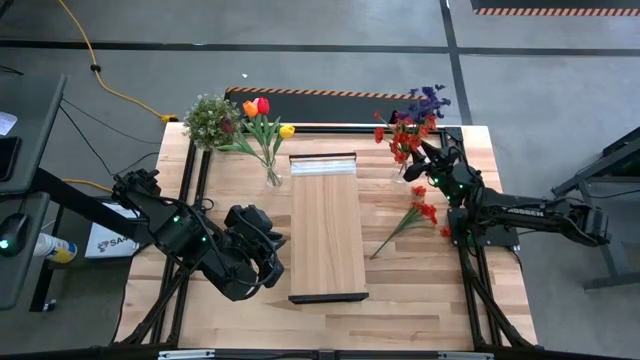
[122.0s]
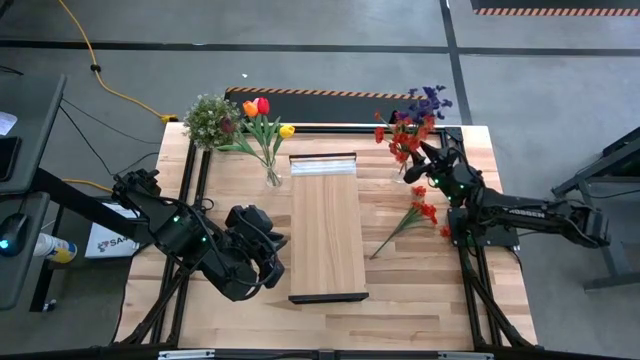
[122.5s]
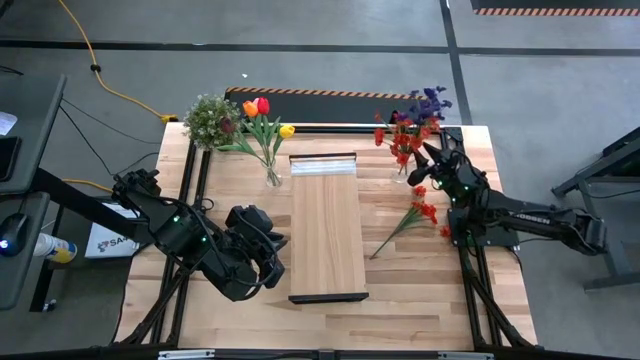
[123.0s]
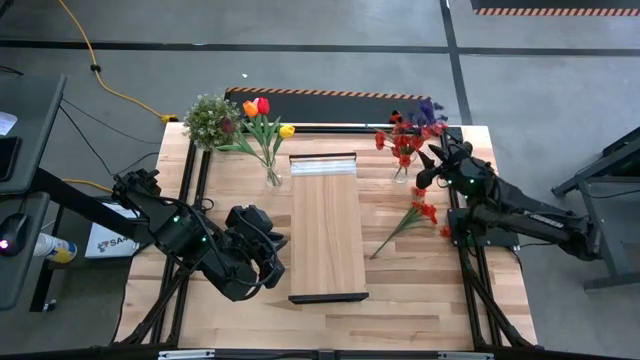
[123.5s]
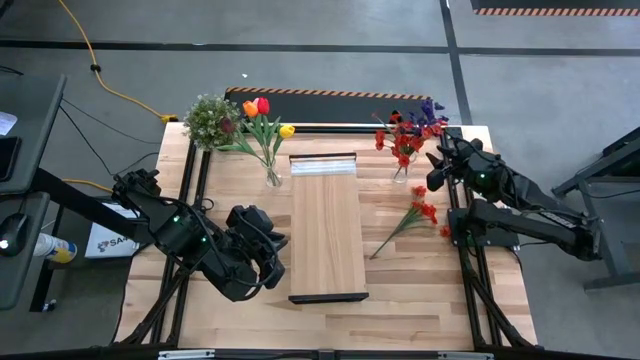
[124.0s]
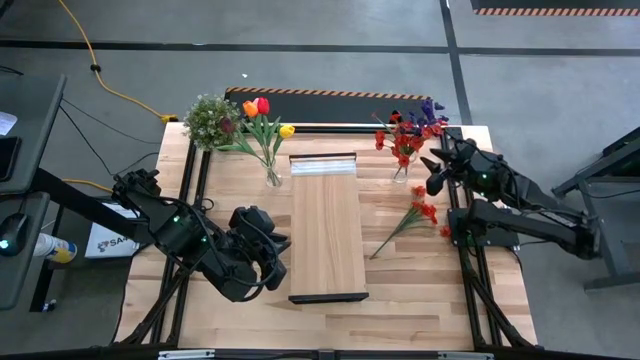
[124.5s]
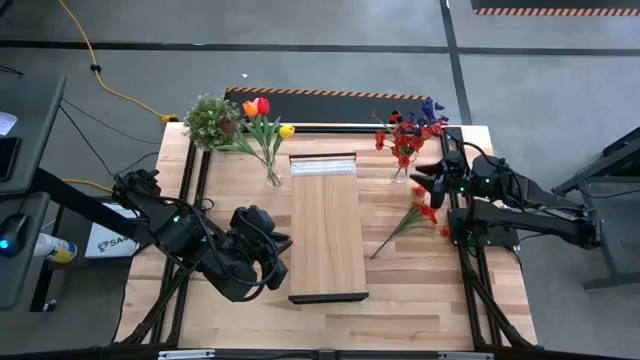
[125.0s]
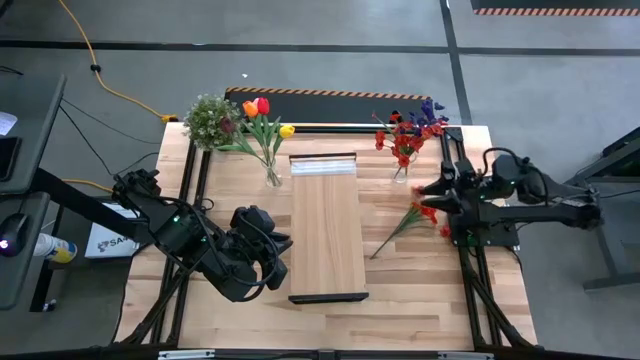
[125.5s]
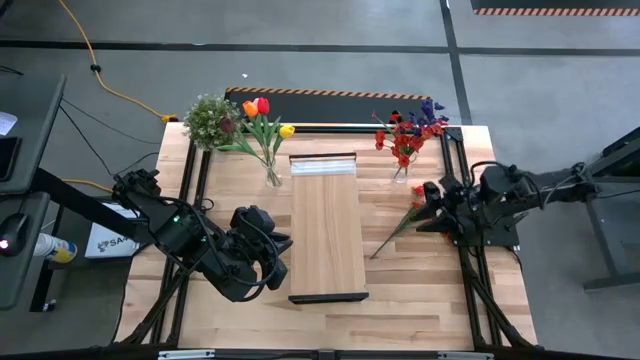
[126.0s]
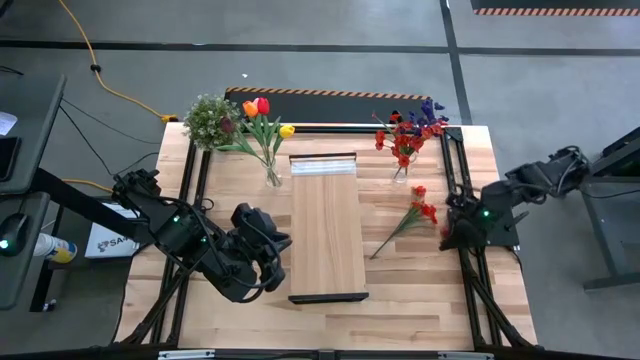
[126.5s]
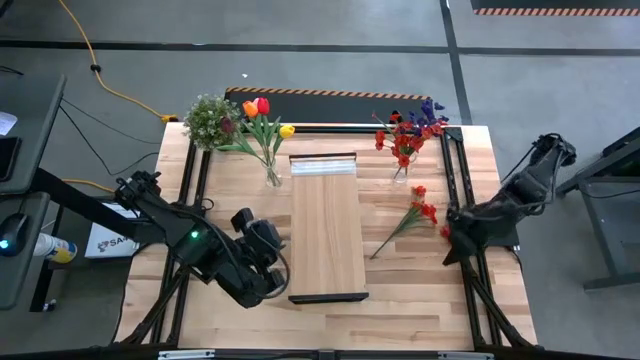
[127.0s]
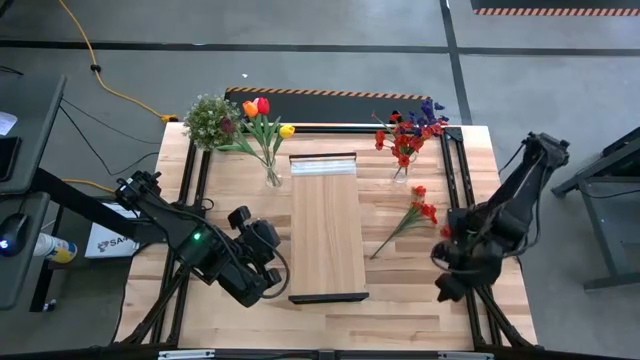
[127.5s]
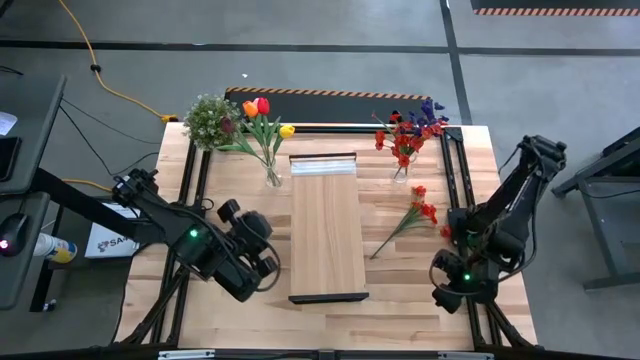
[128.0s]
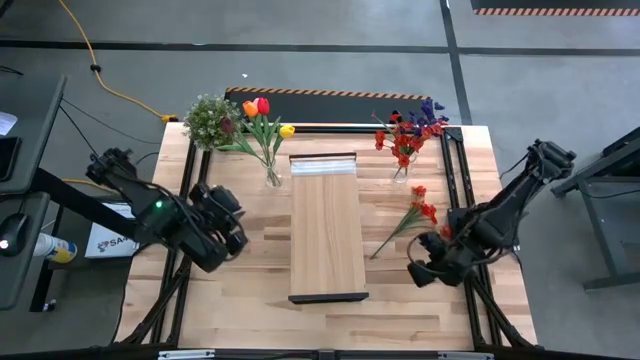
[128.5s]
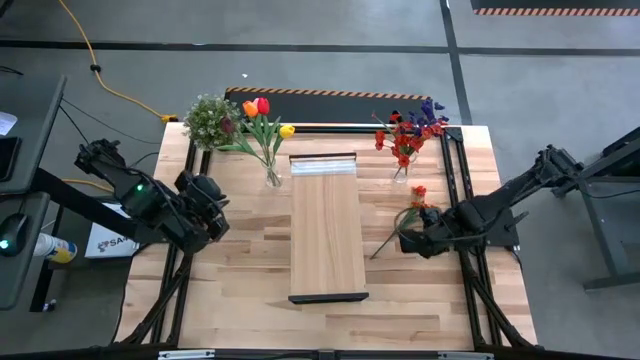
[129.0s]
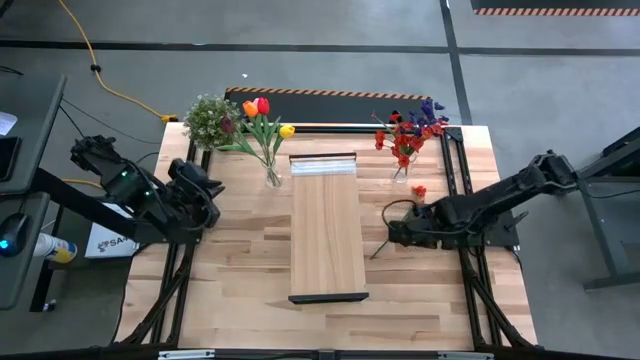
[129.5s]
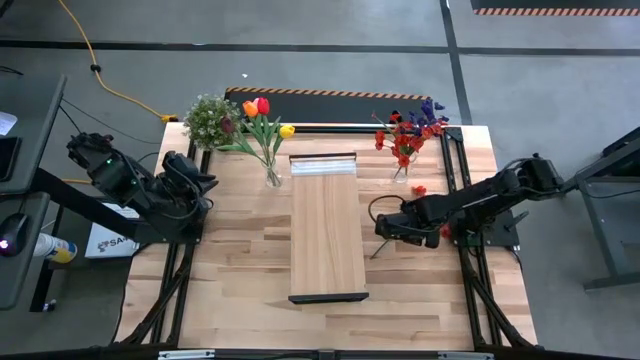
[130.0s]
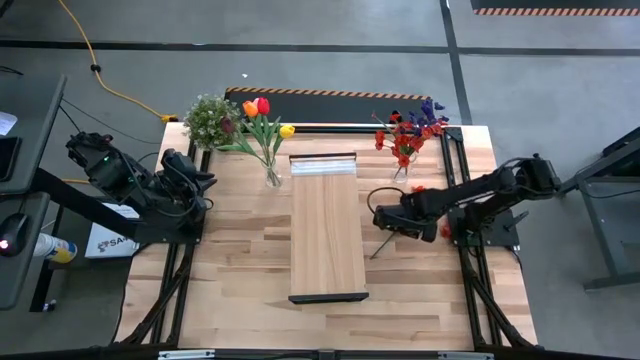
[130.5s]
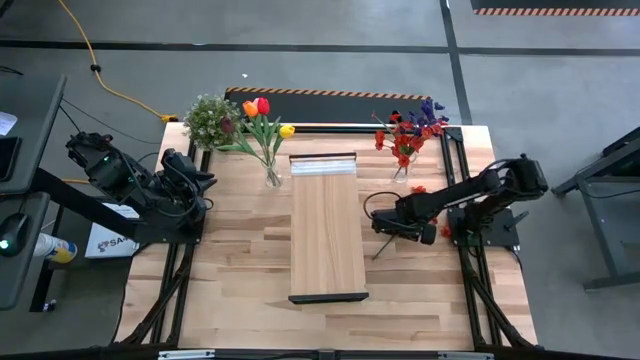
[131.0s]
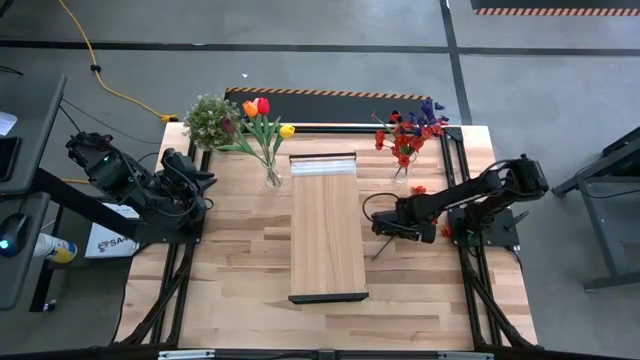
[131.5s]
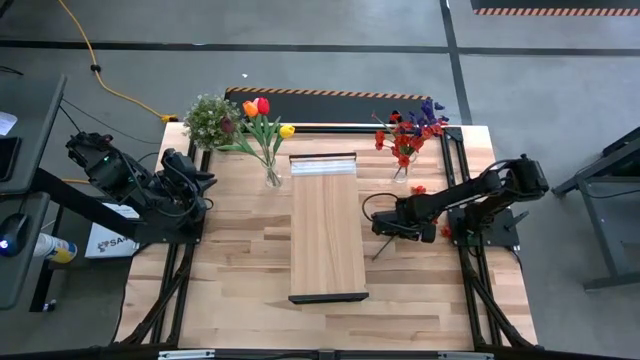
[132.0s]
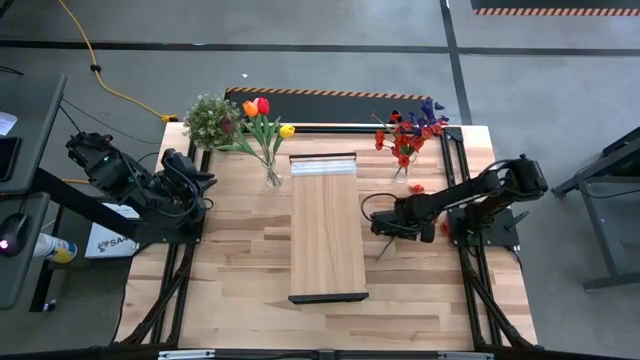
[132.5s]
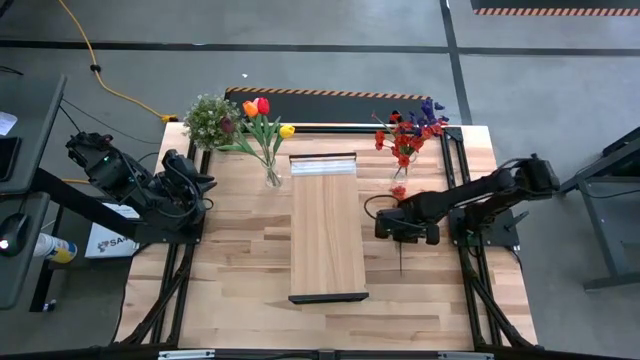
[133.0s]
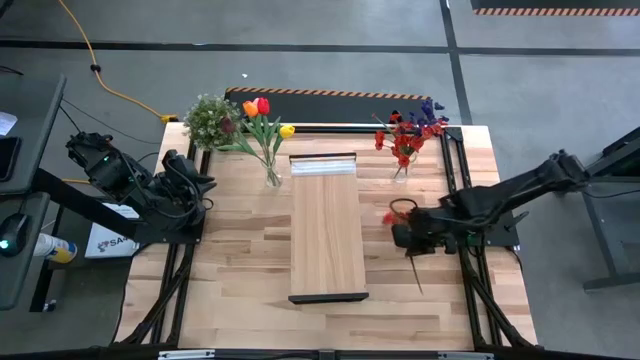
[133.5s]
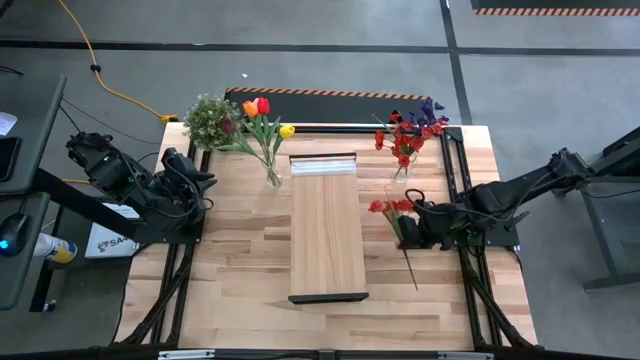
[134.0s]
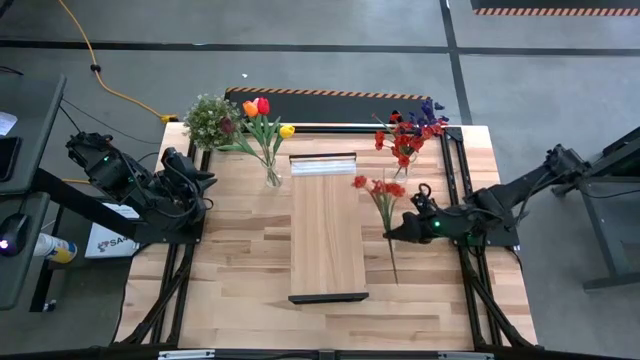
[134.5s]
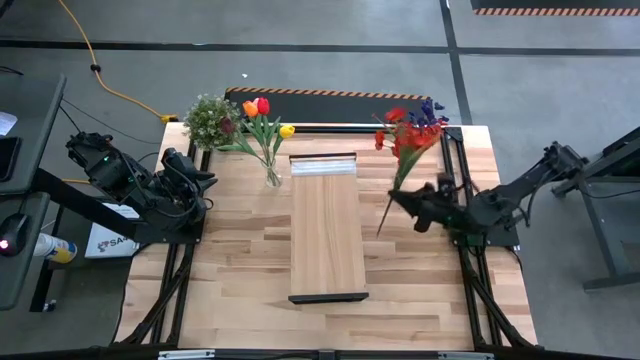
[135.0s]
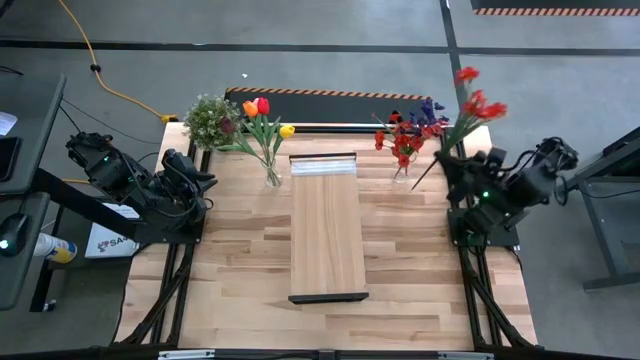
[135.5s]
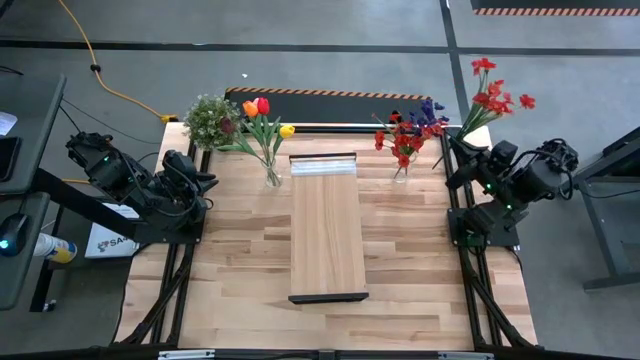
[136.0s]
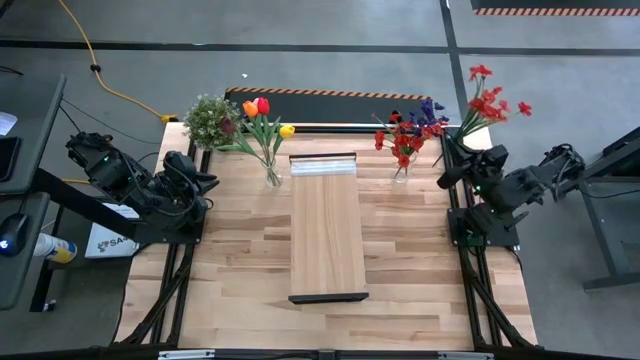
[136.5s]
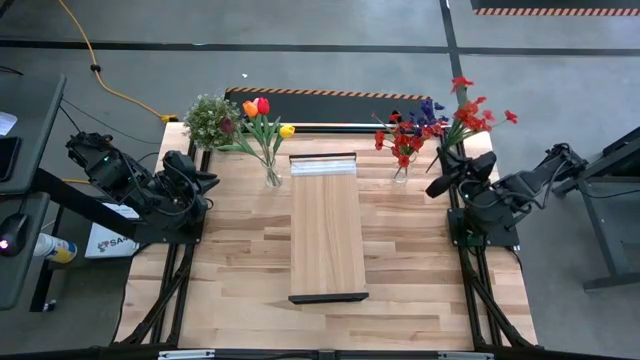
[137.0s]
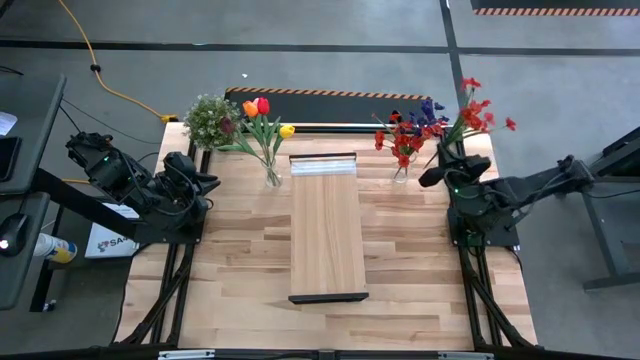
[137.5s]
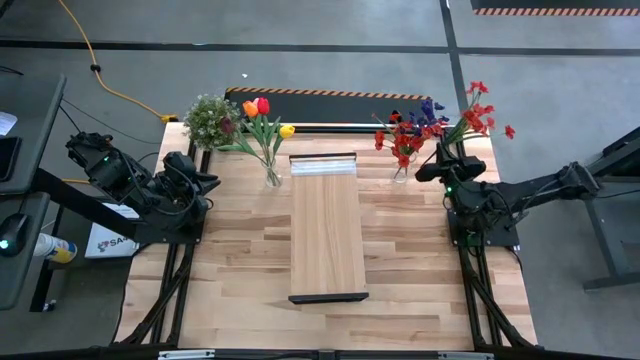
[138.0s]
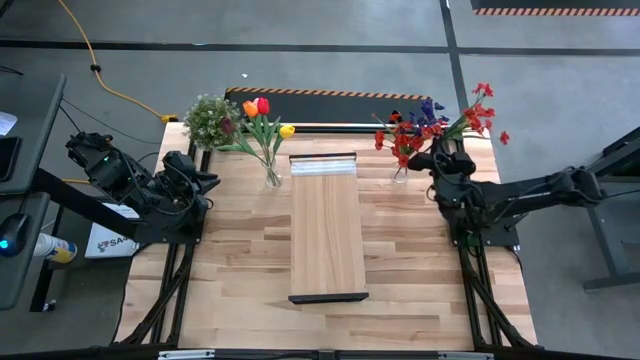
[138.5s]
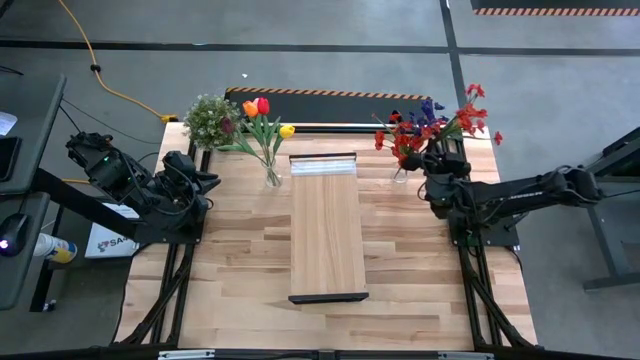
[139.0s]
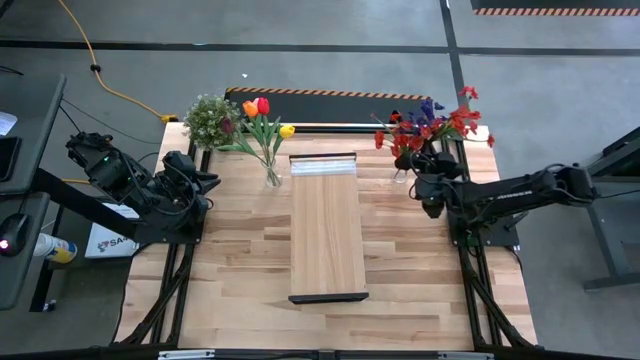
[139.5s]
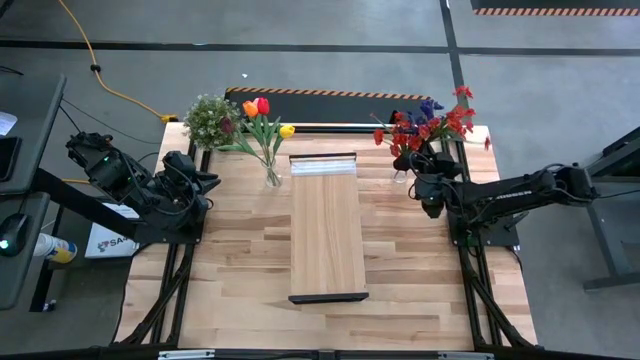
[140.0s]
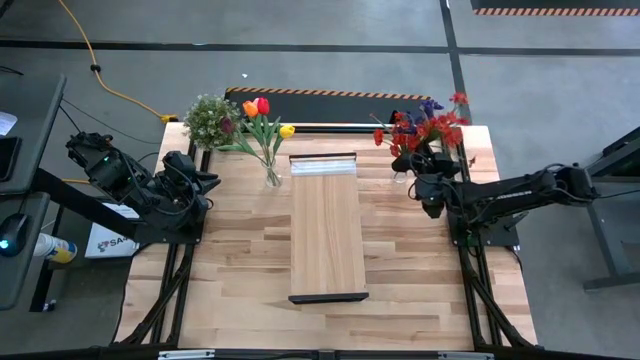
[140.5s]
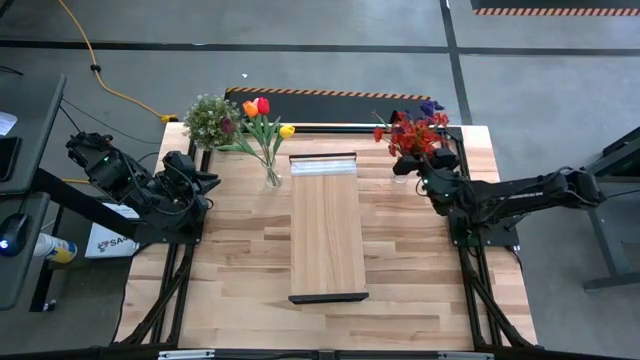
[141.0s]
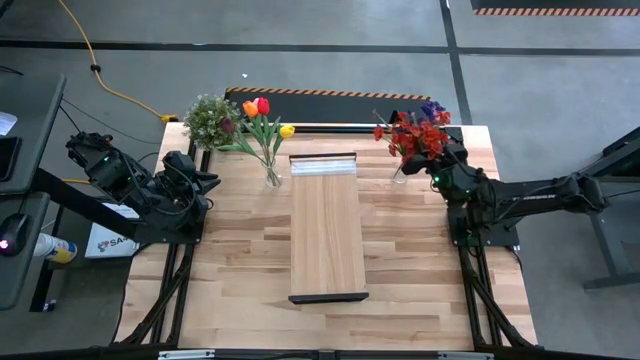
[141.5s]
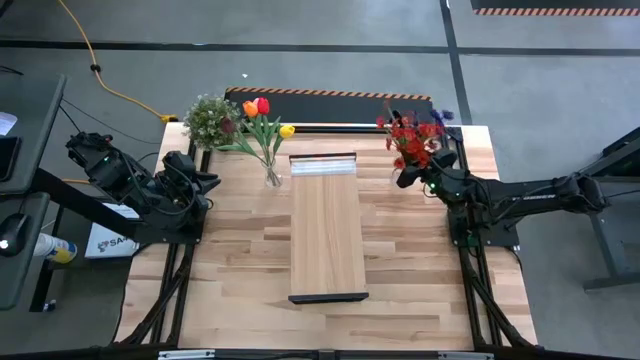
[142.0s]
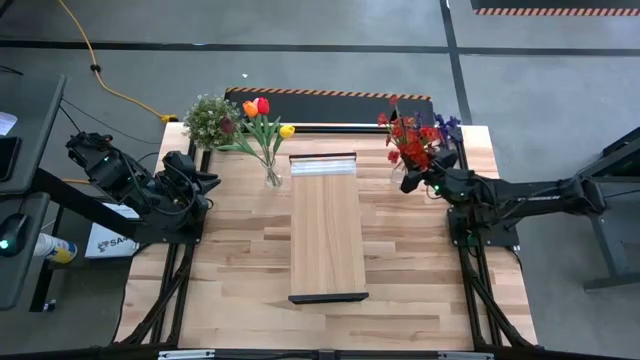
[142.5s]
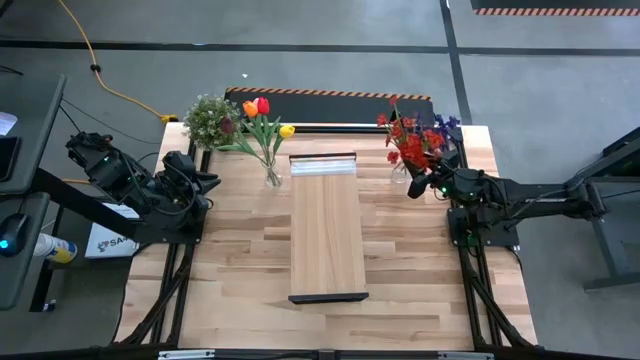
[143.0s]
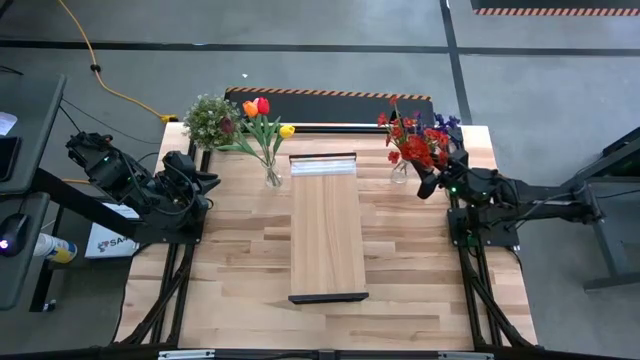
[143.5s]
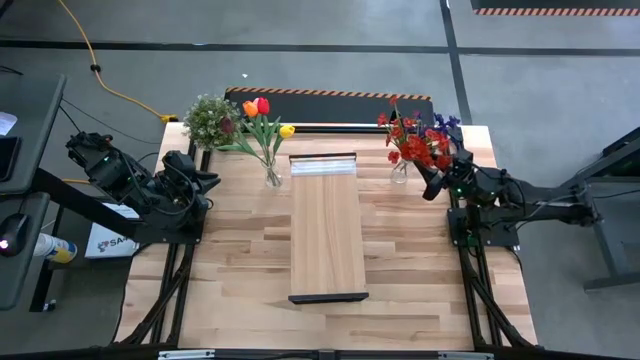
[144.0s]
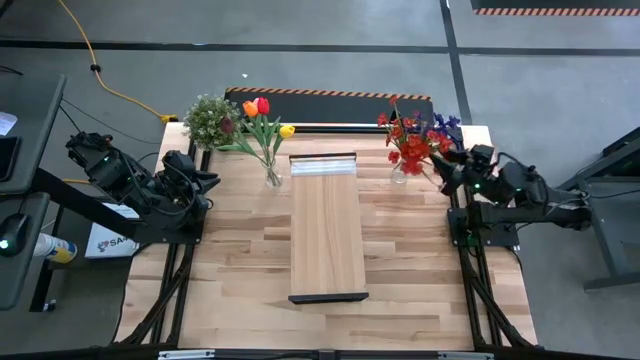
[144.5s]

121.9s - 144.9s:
Task: Pick and place flowers into a vace then onto a shelf
Put the orange flowers into the right transparent vase
